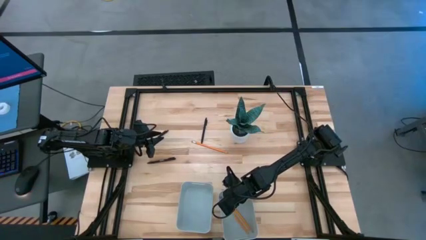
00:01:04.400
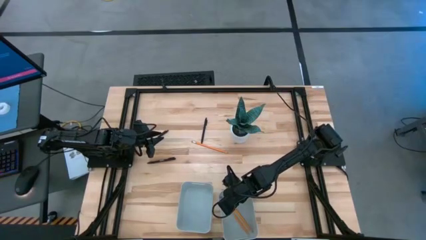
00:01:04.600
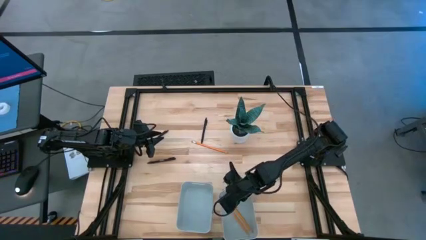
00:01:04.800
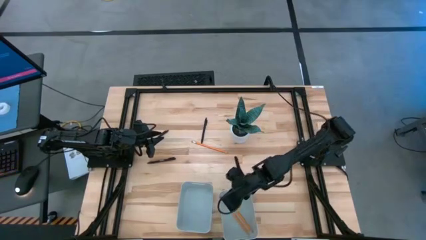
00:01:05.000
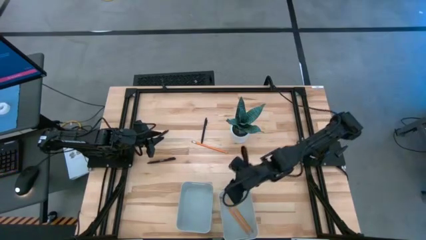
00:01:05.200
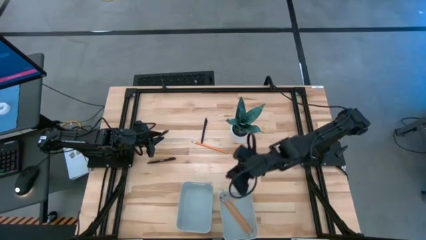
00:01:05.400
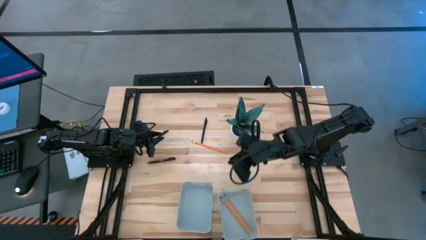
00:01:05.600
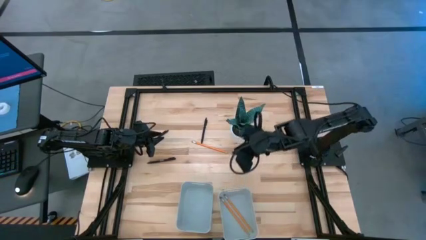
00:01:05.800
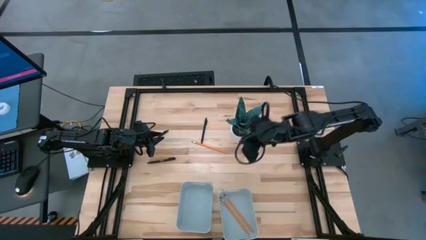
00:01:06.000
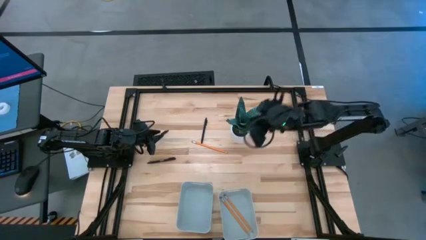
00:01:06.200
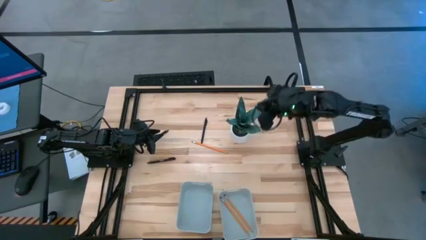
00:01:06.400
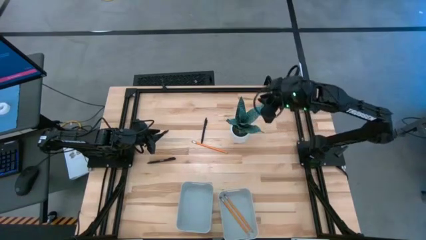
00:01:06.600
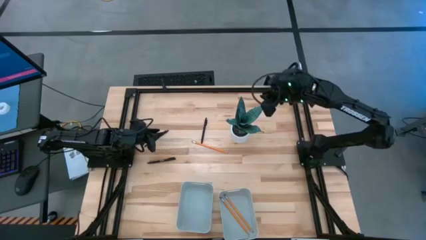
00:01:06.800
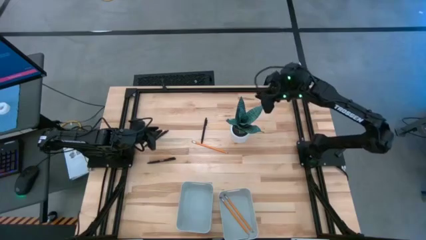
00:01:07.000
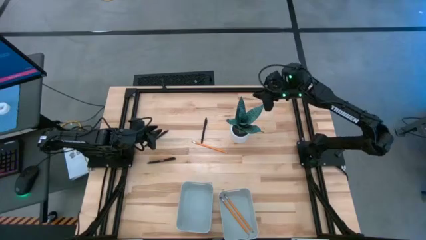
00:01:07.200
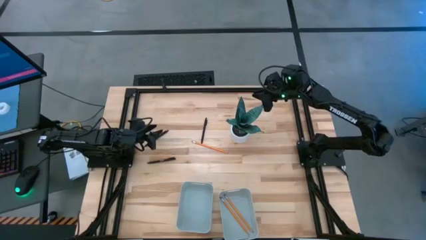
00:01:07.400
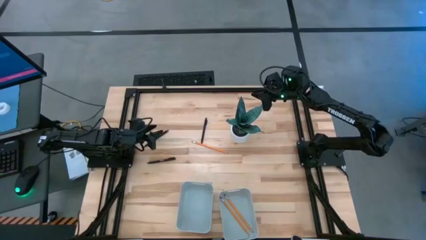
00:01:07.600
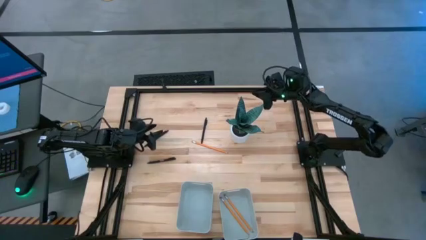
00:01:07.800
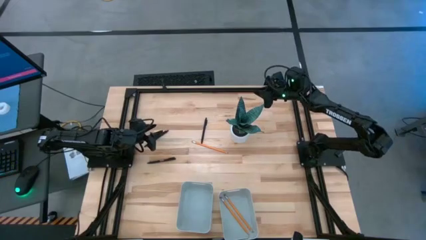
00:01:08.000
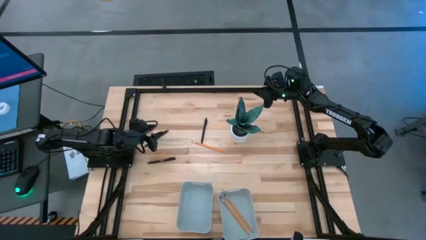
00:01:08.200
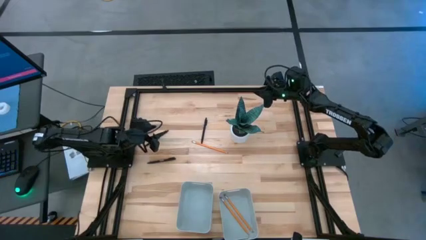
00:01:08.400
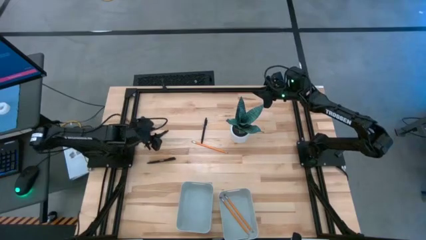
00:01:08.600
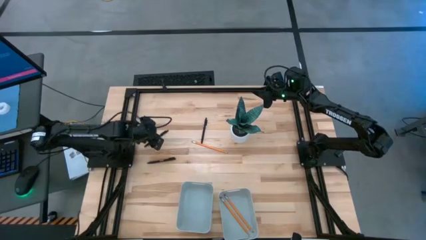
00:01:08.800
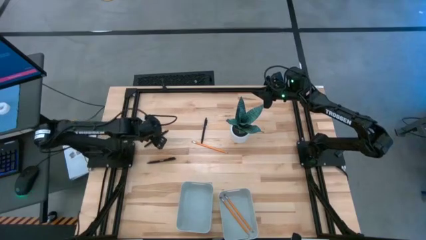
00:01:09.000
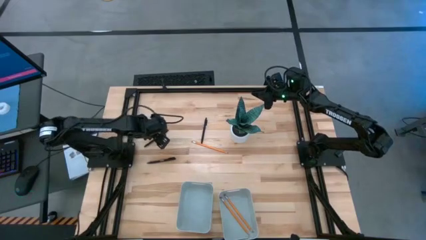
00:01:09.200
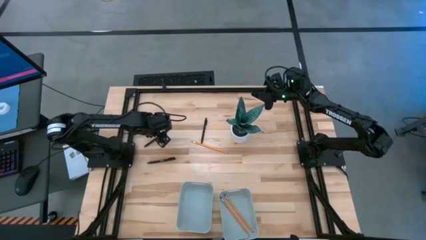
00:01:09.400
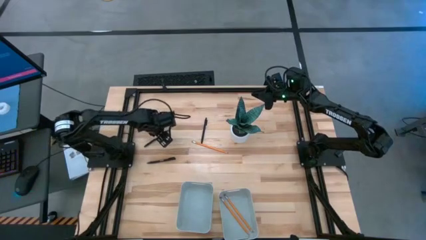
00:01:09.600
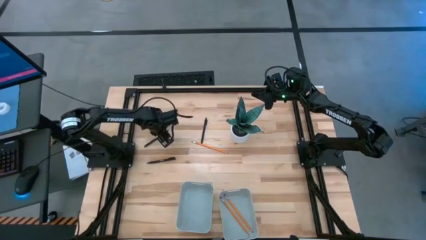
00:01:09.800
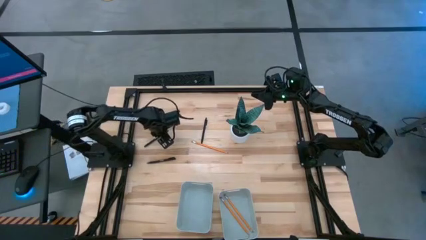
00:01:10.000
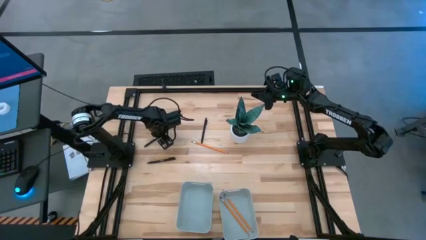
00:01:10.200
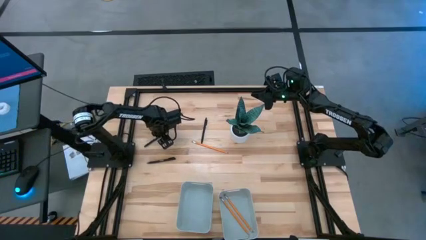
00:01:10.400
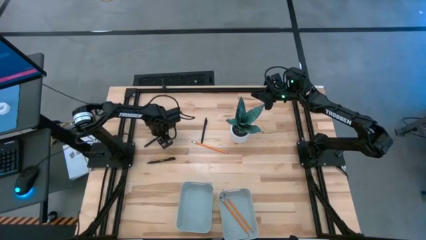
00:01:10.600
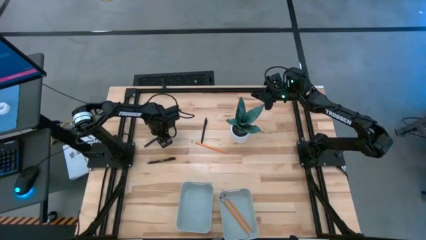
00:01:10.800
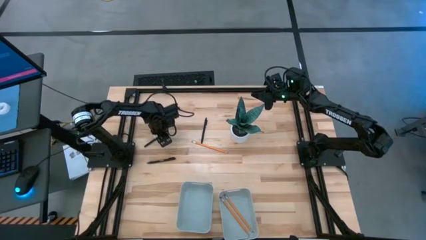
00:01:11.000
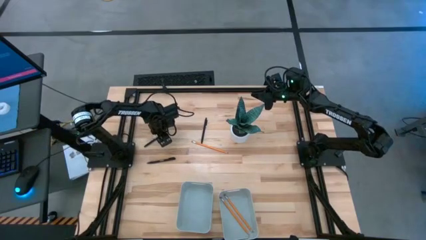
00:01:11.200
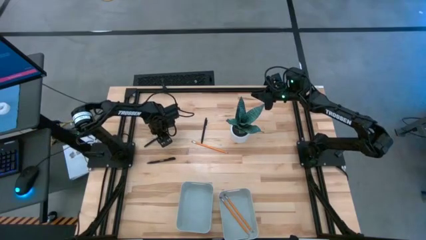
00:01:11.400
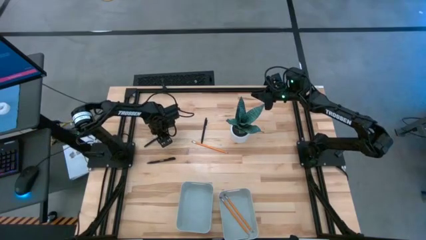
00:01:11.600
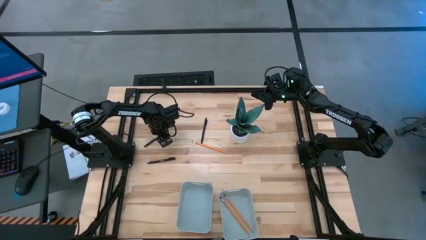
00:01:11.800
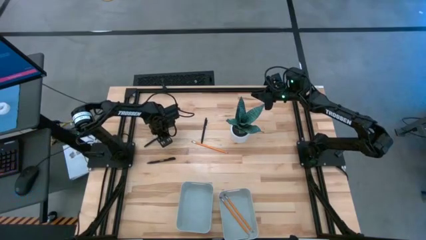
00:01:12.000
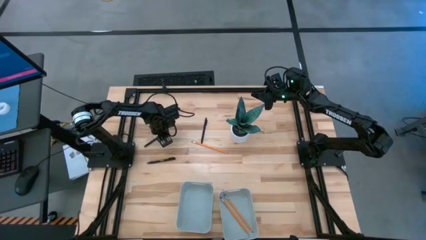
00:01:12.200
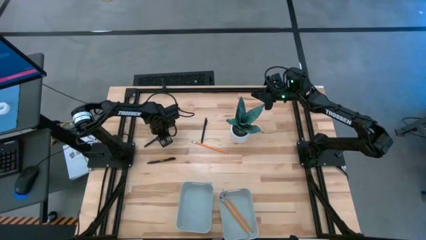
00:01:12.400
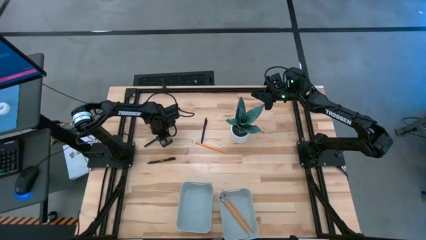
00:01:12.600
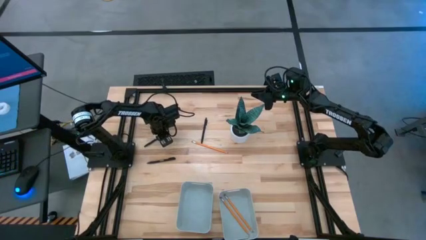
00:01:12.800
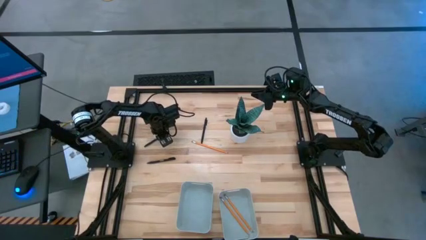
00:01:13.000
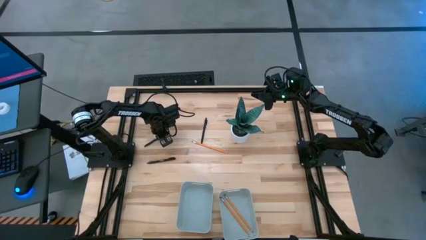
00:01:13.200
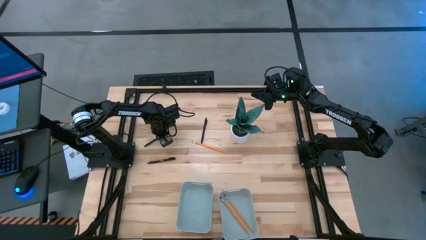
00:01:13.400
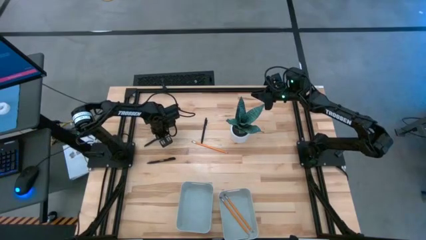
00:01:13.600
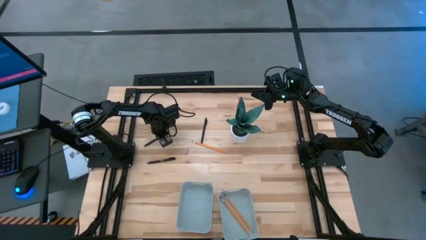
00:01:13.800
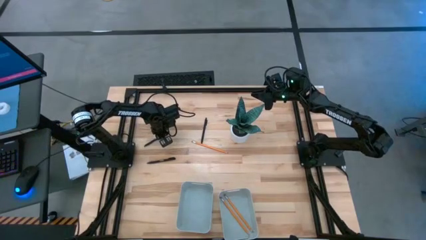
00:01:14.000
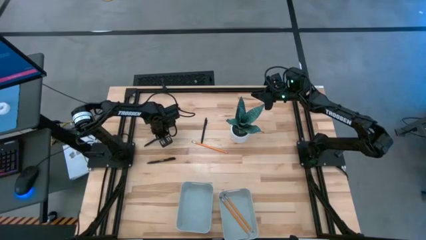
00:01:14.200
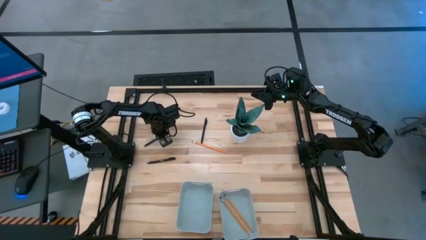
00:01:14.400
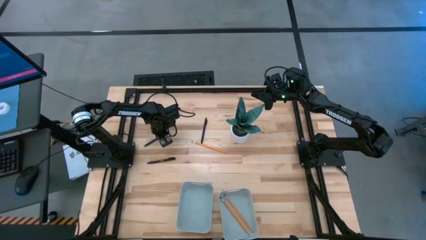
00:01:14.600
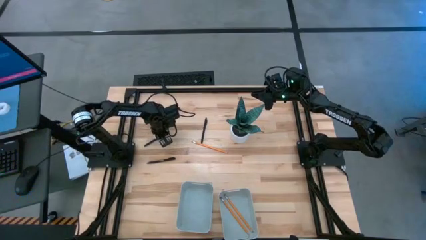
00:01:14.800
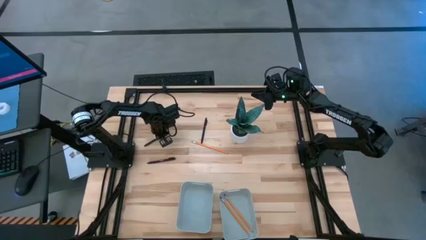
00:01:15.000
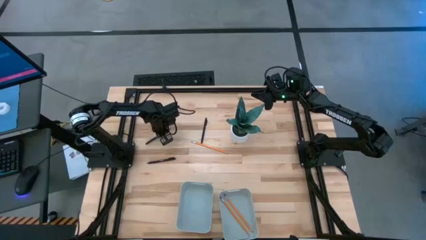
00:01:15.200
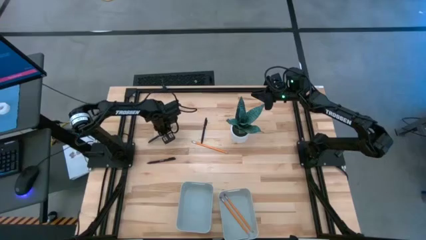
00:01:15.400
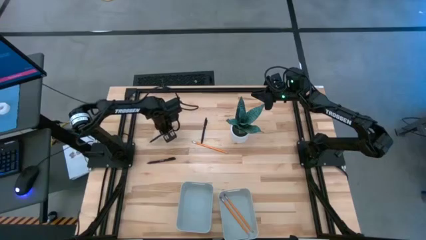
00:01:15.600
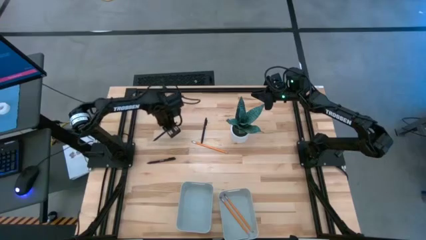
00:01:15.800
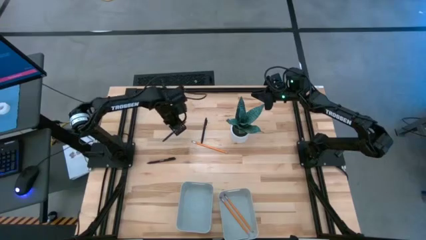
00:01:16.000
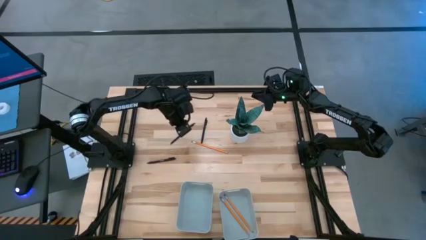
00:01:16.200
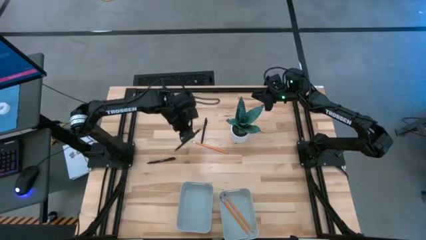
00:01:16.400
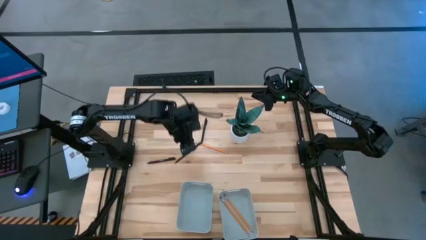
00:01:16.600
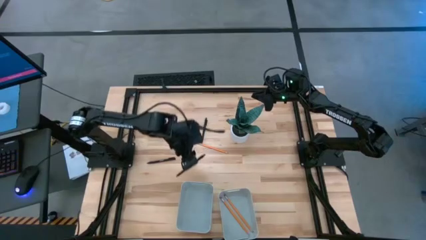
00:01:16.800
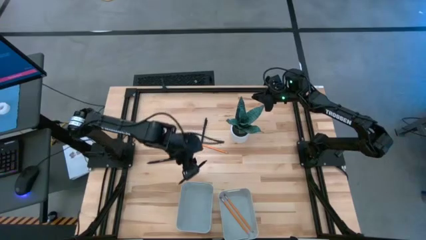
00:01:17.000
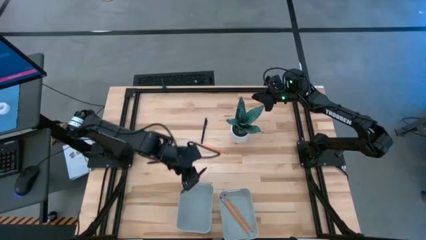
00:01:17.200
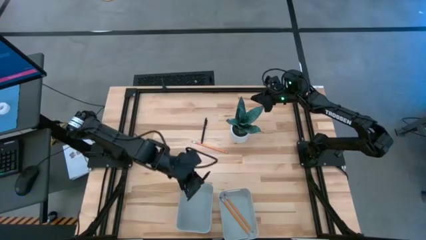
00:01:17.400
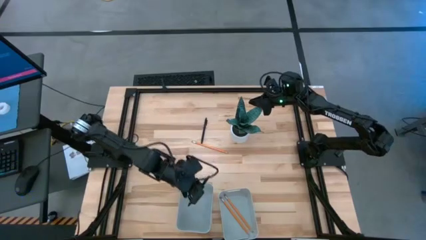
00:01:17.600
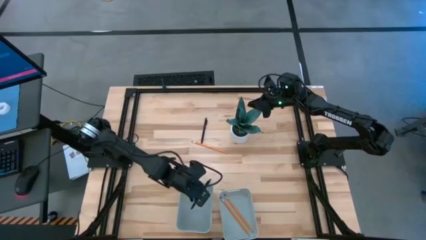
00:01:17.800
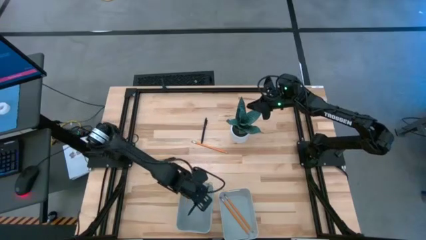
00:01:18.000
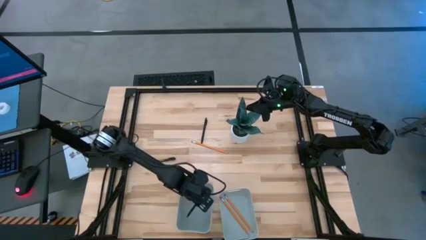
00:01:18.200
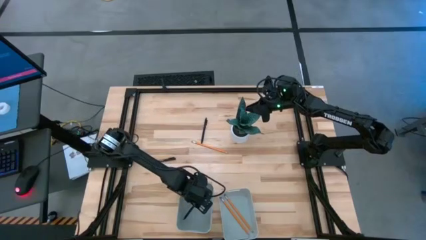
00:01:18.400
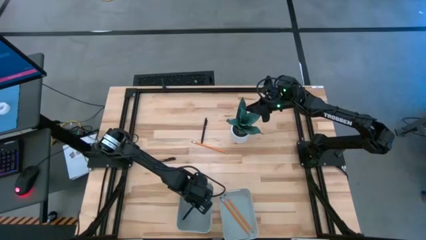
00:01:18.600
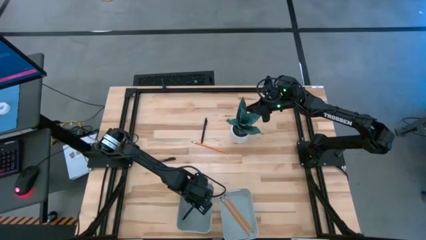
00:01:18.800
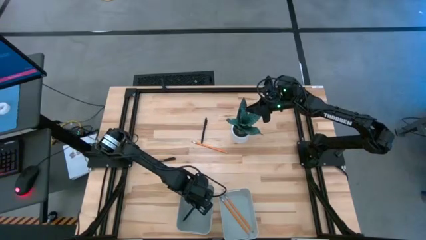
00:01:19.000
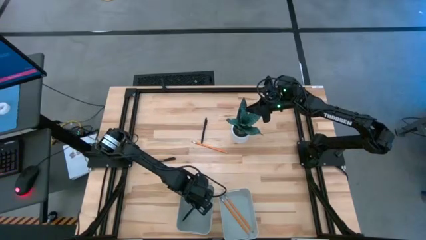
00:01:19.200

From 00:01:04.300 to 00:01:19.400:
Task: Sort pens & pencils
Put the top left pen into the left gray bin

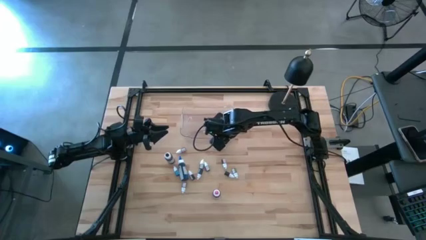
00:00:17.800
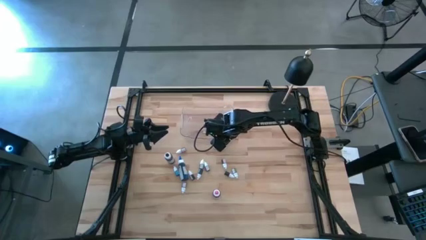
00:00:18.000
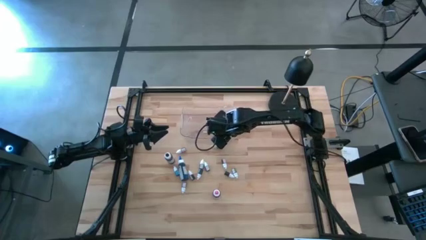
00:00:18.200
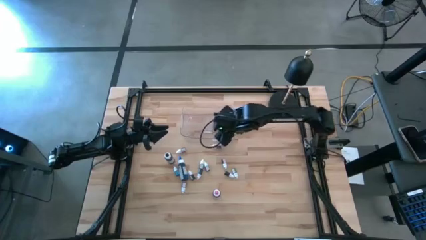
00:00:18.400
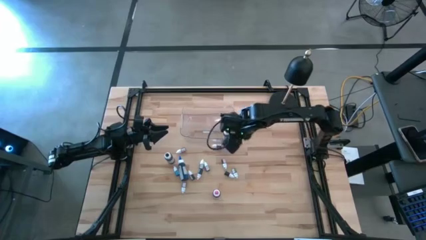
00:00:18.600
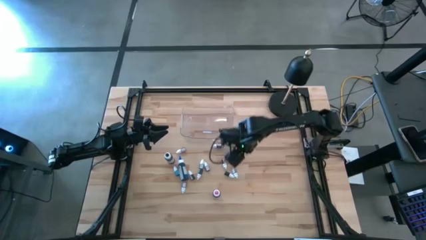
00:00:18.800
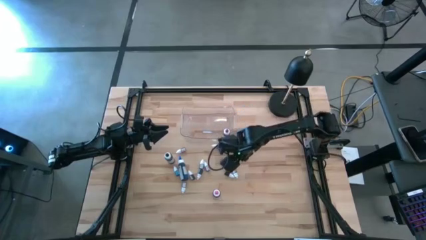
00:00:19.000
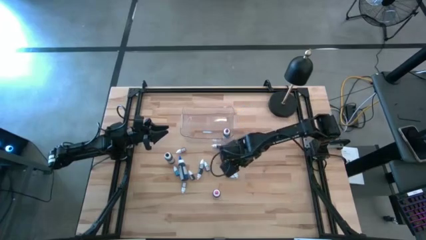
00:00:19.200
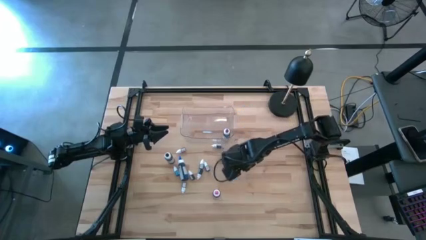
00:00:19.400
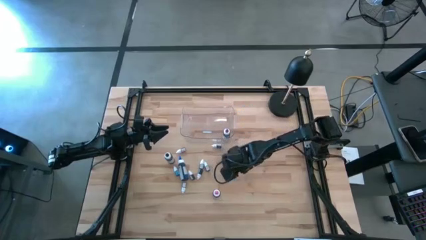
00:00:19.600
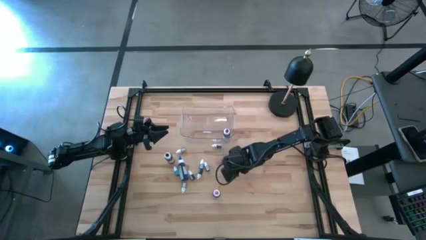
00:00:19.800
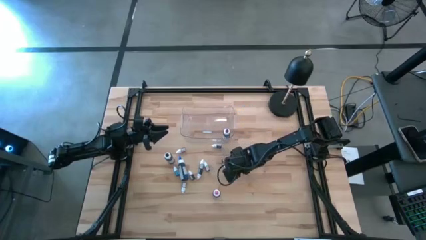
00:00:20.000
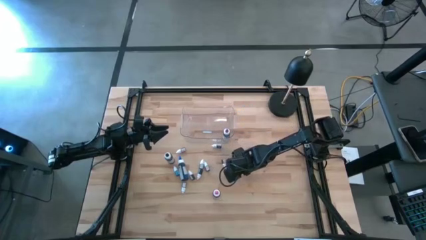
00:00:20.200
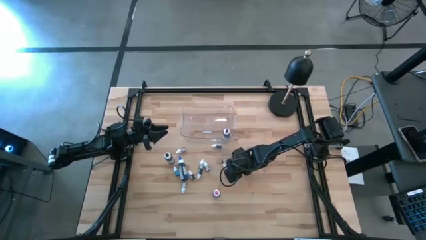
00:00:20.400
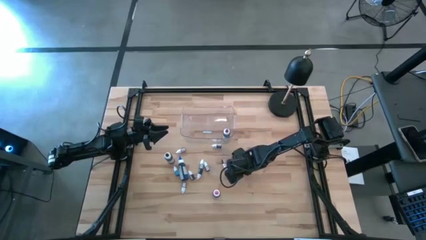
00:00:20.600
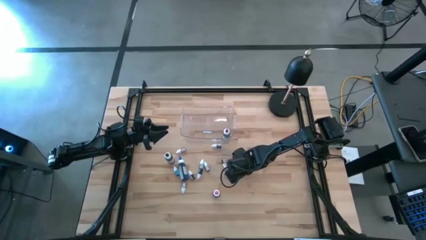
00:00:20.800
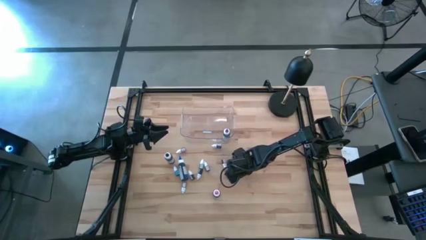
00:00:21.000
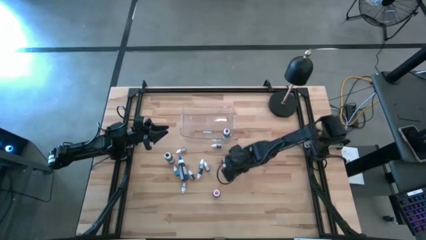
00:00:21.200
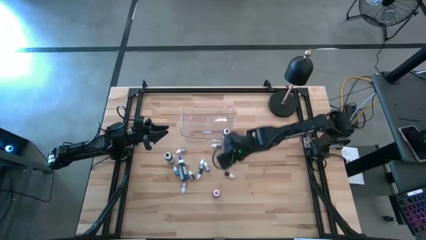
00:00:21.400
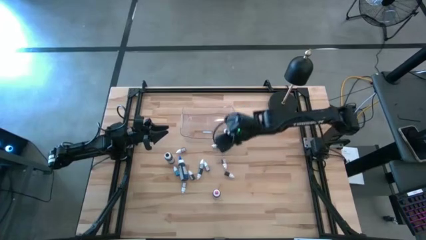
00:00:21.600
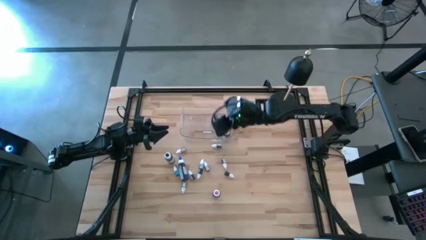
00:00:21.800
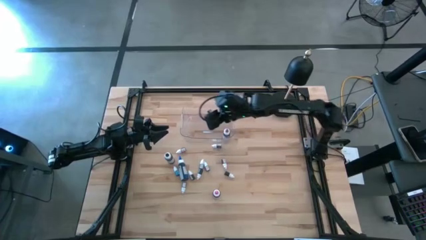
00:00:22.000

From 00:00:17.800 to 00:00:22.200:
Task: Pick & Place food coloring
Put the small green food coloring bottle into the transparent bin
